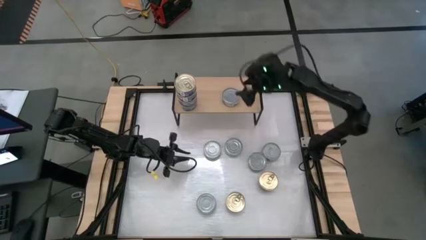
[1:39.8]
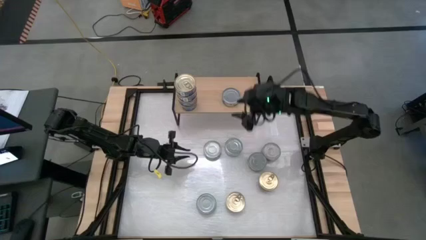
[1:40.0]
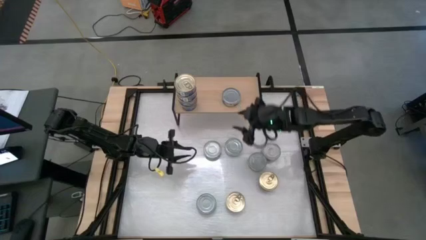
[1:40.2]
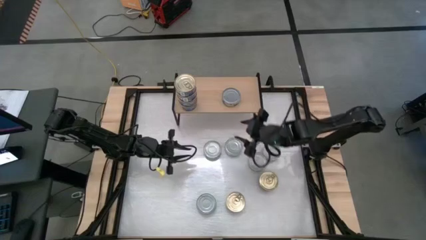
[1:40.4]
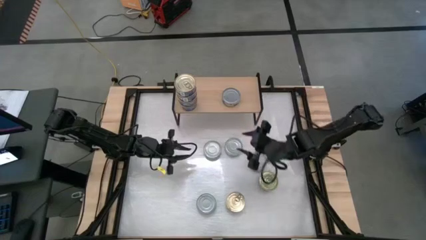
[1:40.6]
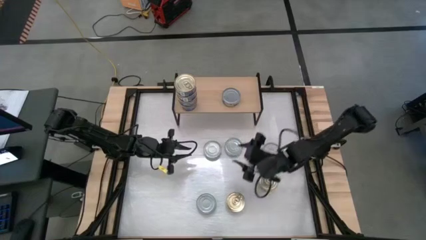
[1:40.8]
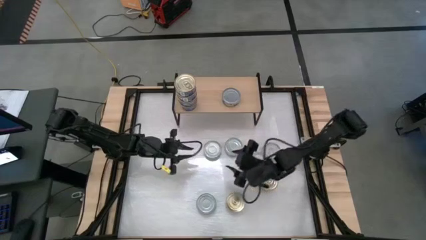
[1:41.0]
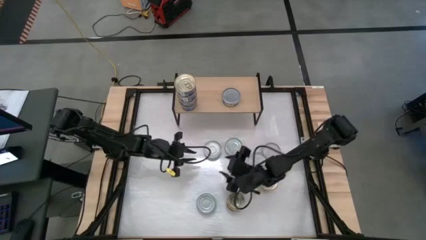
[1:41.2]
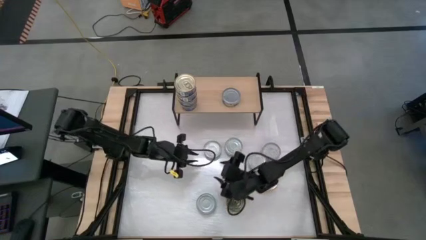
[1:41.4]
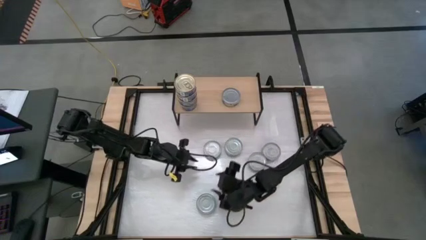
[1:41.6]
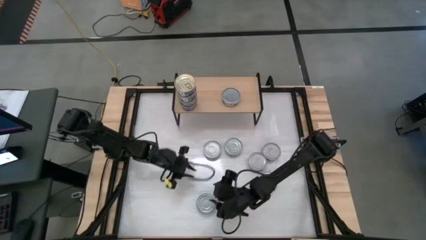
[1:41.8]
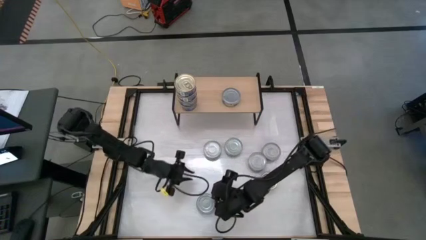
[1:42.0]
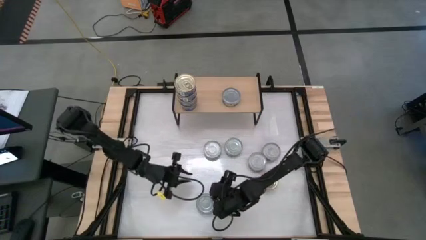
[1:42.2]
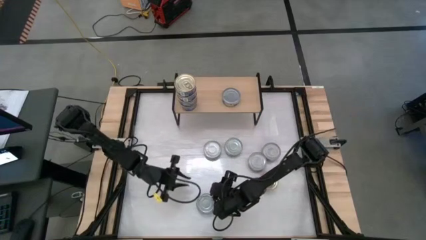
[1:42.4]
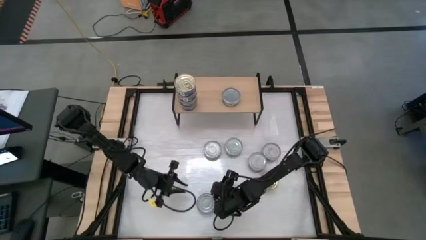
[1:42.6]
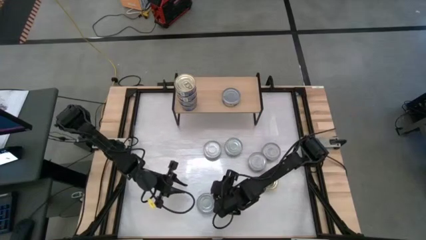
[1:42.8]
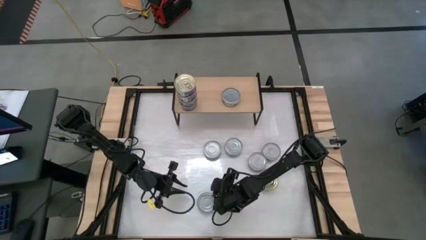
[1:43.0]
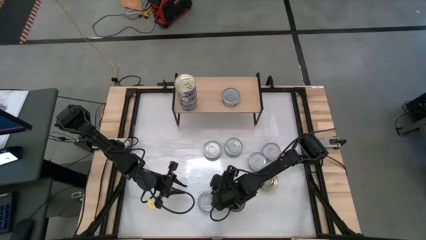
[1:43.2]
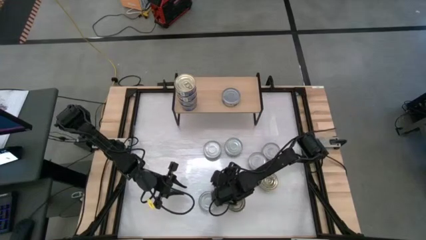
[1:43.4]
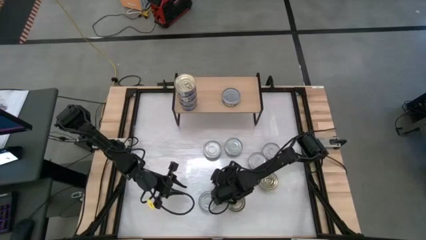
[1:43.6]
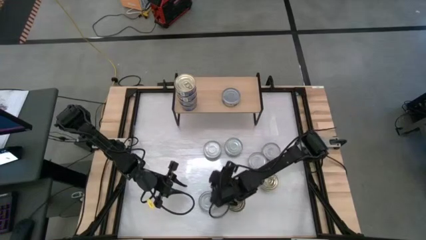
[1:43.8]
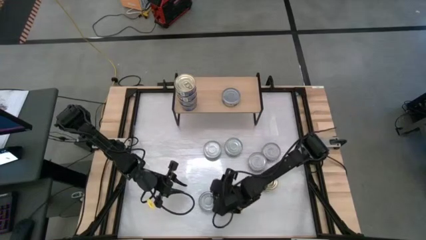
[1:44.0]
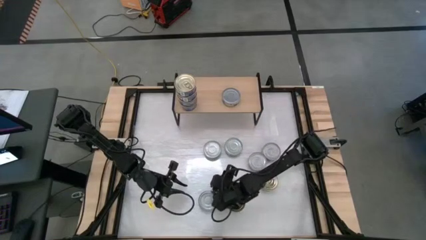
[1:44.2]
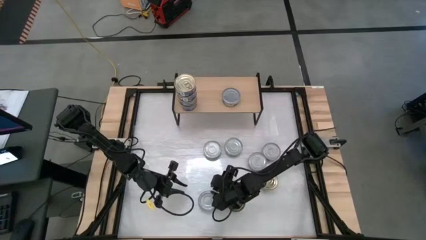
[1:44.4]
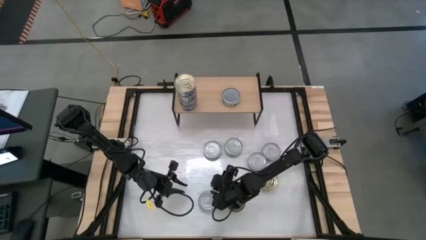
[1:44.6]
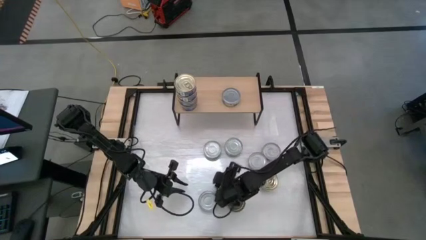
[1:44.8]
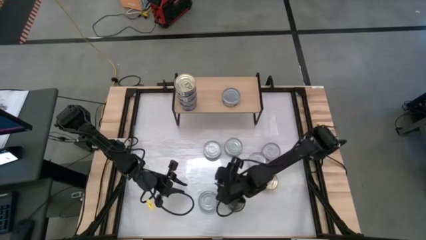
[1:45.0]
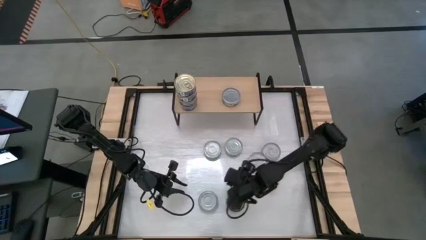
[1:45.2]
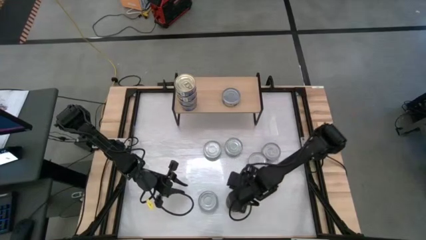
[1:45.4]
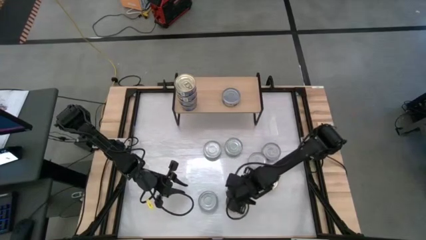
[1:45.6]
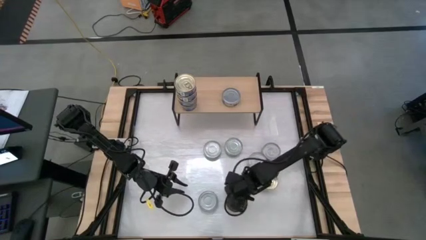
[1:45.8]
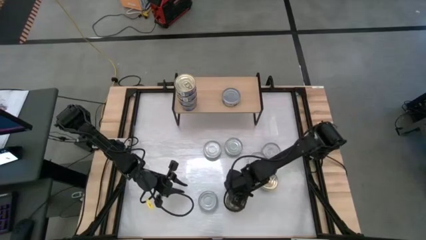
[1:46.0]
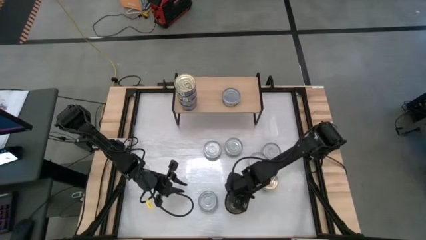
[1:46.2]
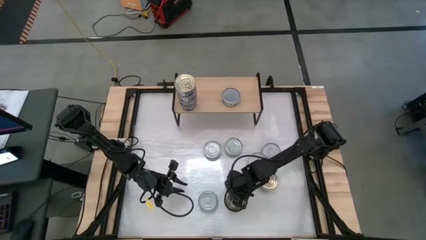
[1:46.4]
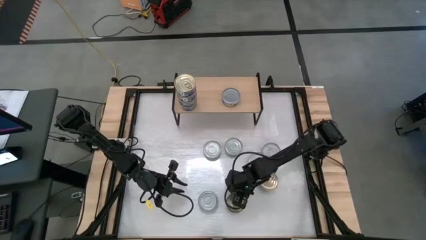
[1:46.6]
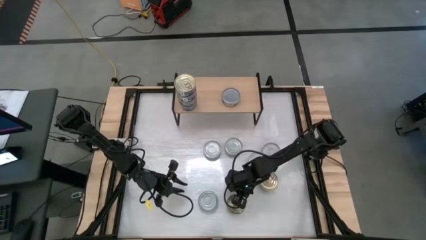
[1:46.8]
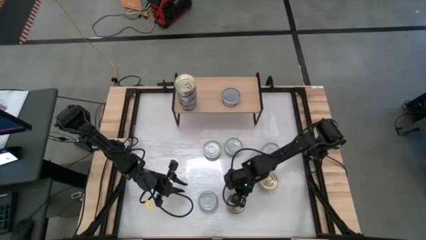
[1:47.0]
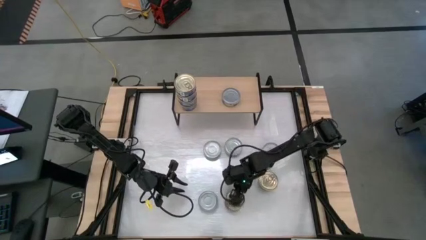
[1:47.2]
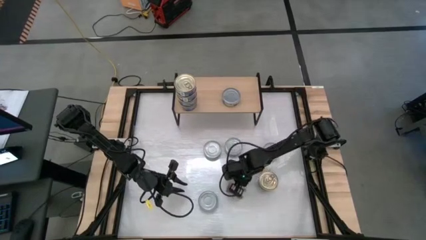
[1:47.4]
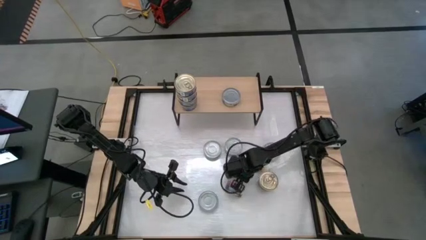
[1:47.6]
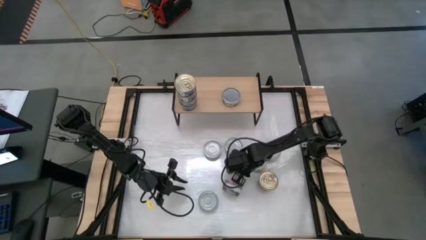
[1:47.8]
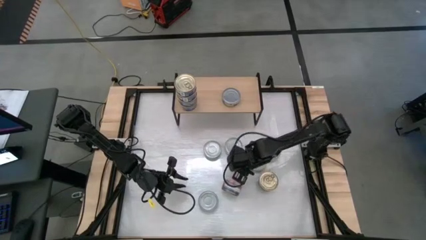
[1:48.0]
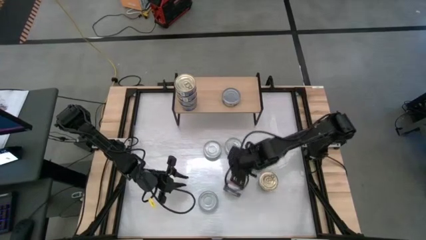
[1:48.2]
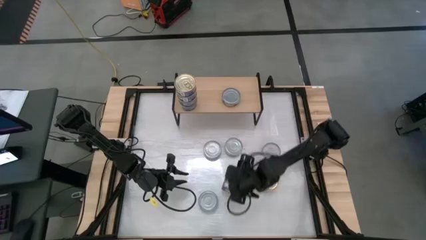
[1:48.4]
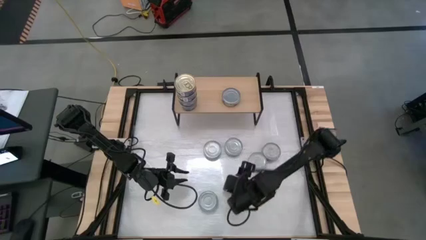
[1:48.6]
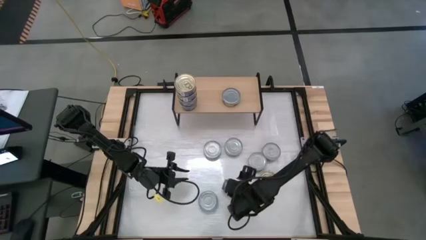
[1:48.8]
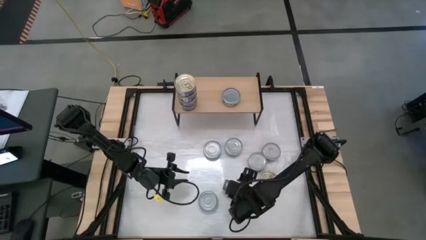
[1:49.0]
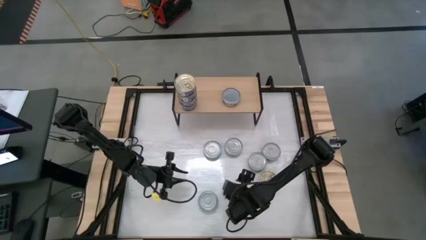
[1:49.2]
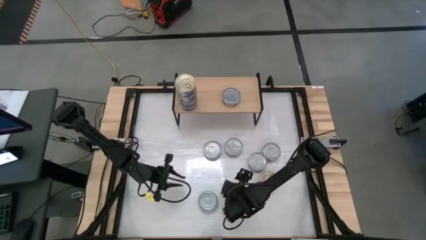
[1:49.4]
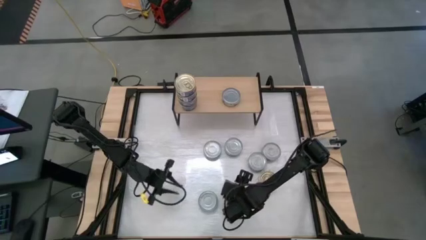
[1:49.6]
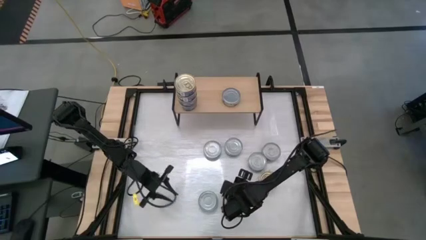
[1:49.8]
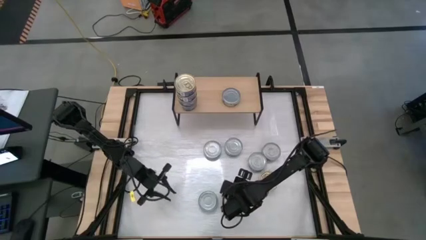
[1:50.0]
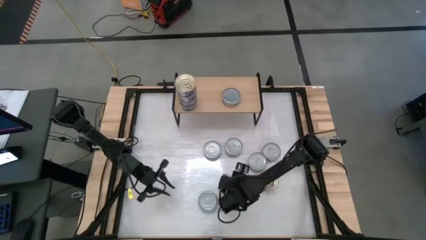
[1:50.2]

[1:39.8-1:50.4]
Task: Stack canned seafood by type on shelf
Stack the blue tuna can on top of the other blue tuna can on the shelf

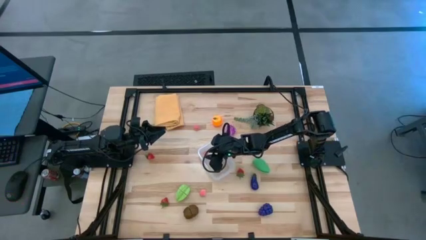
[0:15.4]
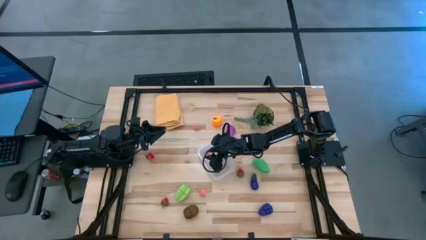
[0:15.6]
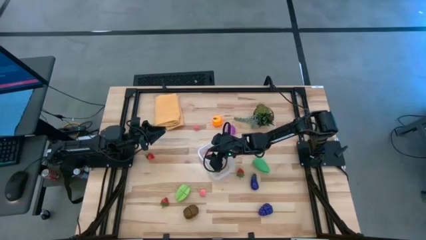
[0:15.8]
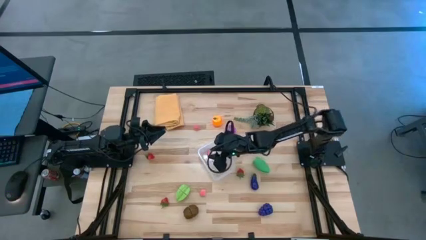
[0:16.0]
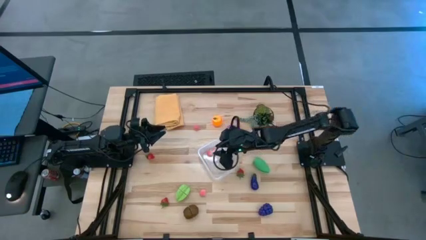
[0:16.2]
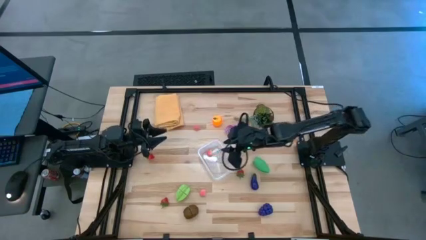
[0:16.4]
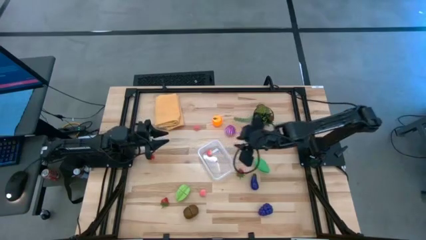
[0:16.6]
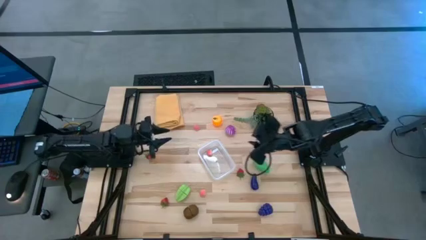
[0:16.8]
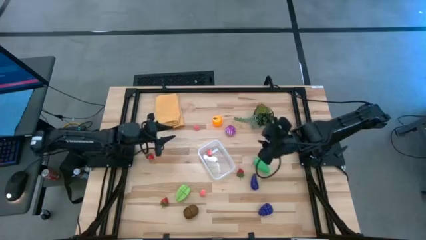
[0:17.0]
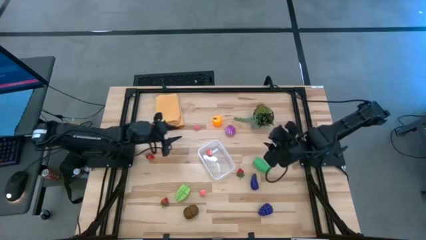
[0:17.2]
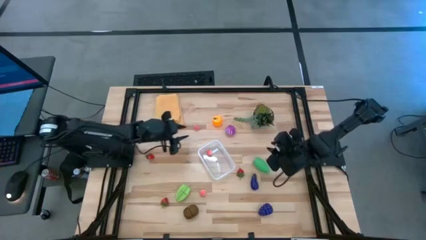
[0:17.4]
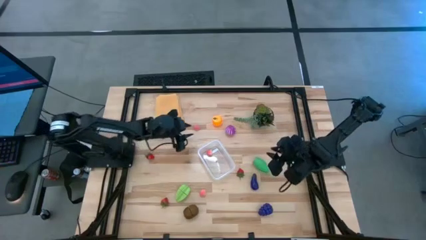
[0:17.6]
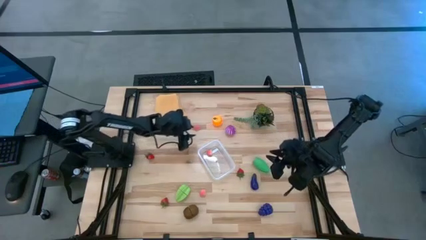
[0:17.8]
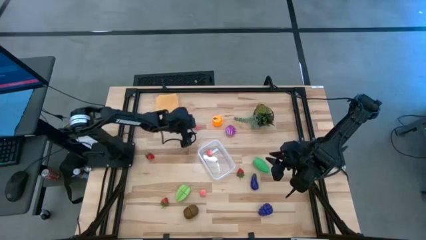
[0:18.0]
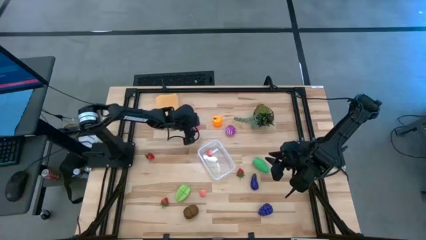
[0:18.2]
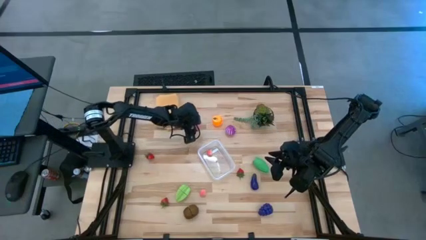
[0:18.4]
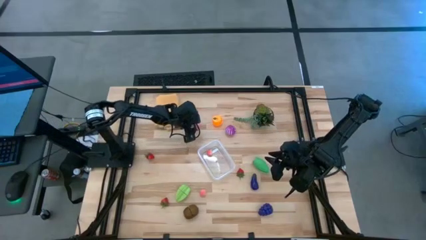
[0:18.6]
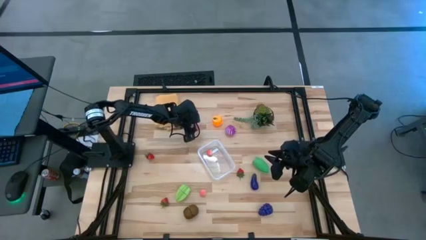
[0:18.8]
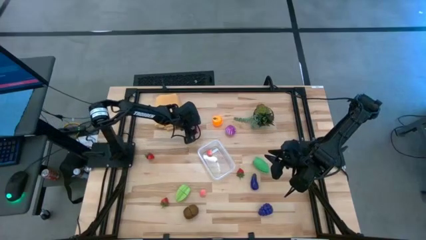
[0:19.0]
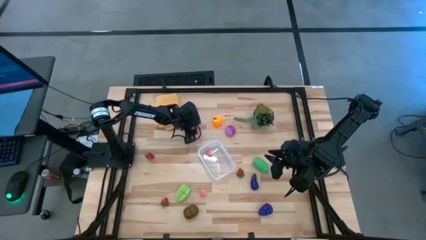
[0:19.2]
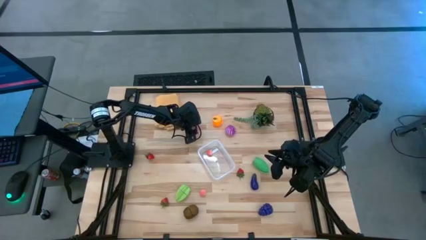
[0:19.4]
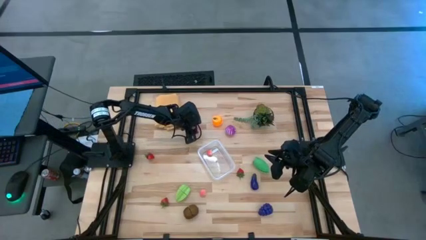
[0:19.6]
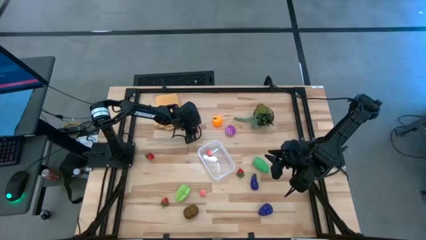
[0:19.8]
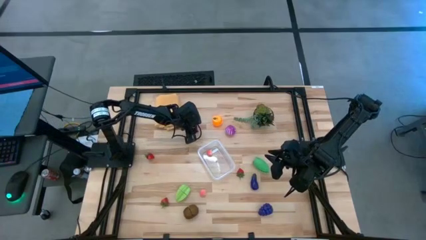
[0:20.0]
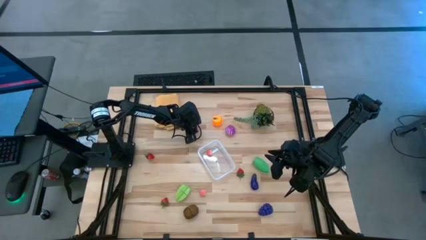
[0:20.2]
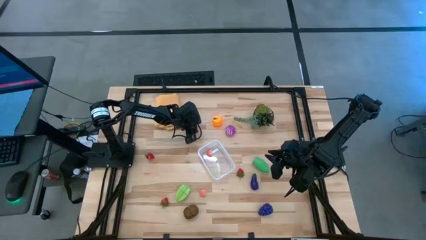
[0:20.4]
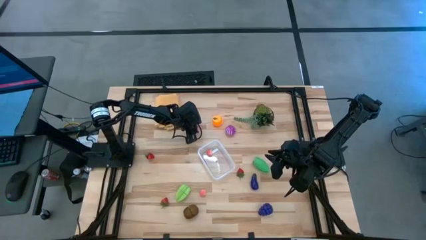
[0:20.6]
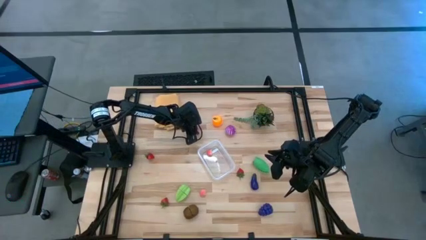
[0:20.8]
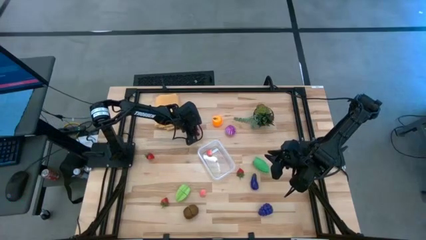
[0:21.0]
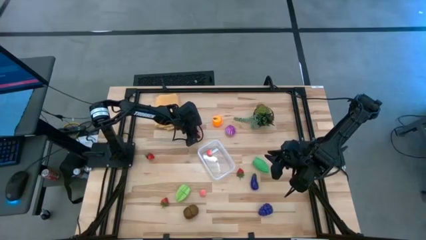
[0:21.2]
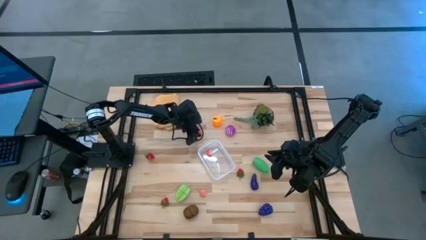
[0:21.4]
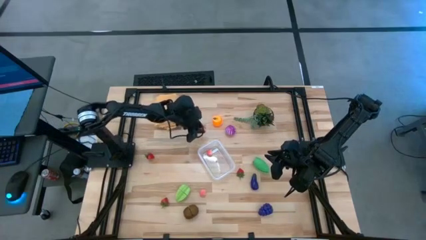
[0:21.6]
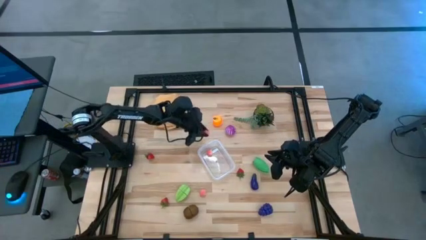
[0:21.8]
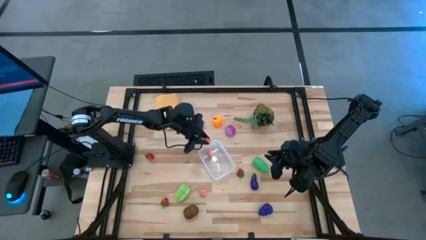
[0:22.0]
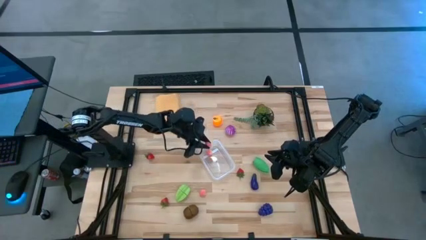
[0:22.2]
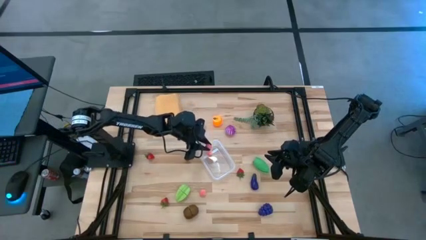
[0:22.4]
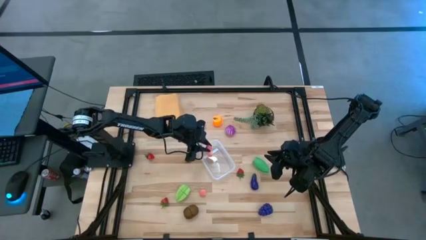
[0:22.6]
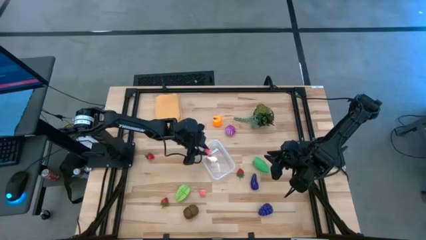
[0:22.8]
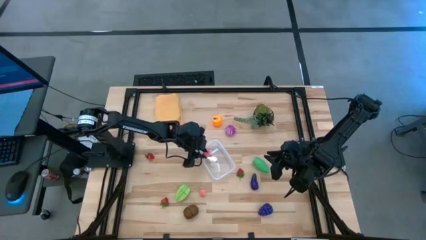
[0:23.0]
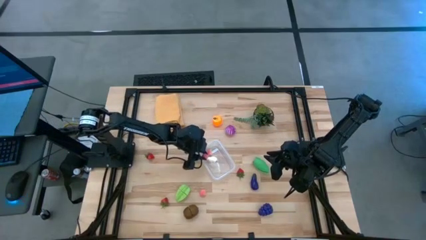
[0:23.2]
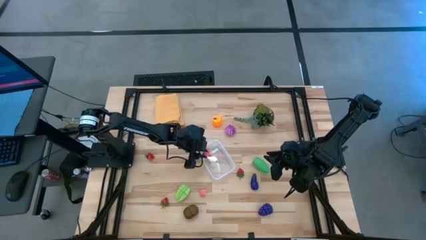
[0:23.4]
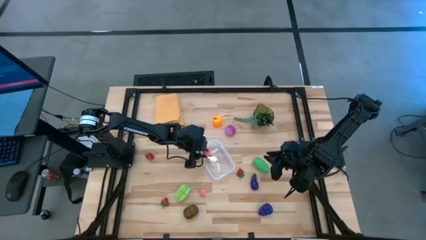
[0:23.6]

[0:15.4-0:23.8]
Task: Pick and placing Produce into tupperware
Put the top pink peach into the transparent bin
